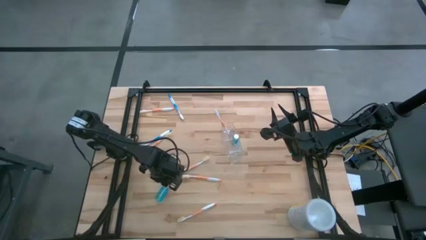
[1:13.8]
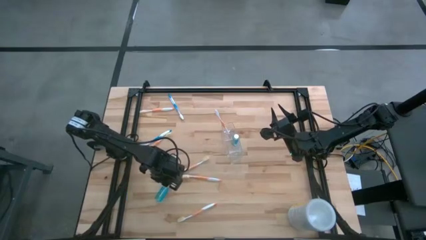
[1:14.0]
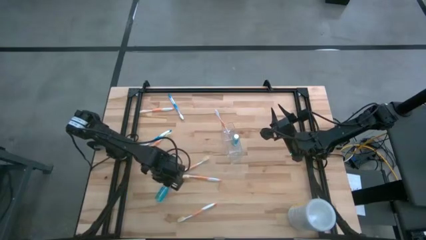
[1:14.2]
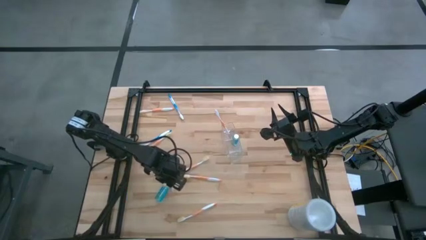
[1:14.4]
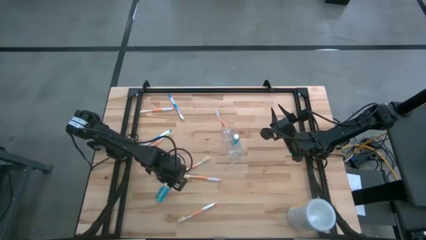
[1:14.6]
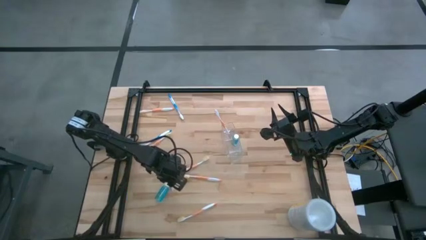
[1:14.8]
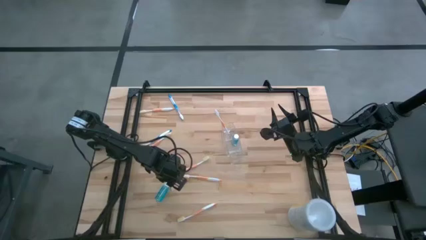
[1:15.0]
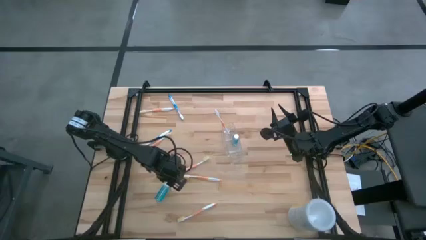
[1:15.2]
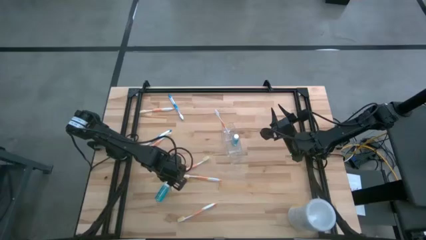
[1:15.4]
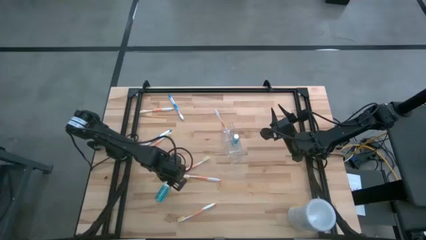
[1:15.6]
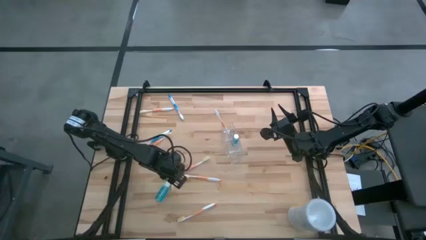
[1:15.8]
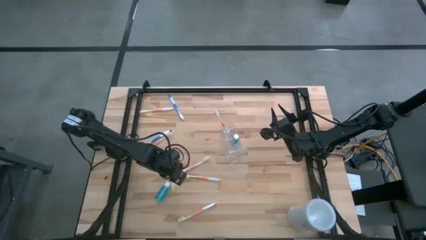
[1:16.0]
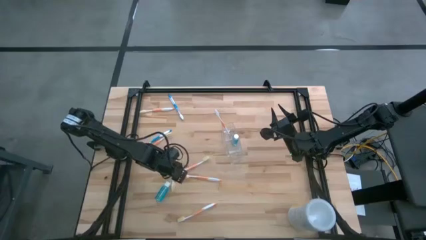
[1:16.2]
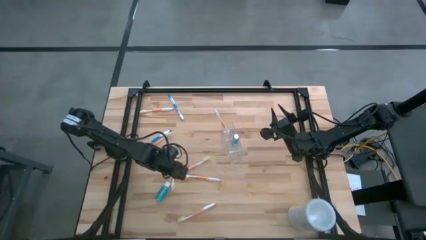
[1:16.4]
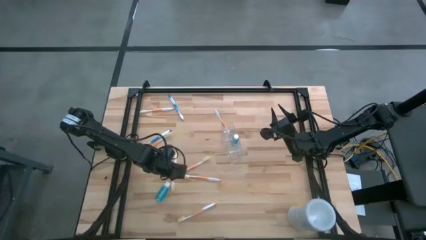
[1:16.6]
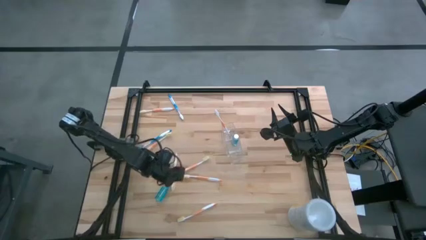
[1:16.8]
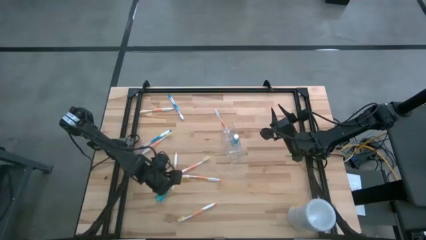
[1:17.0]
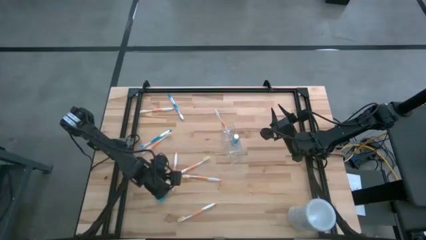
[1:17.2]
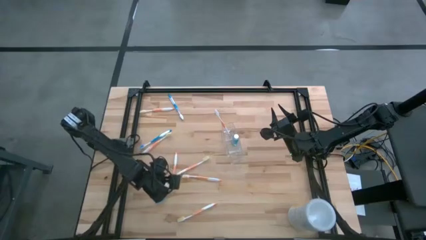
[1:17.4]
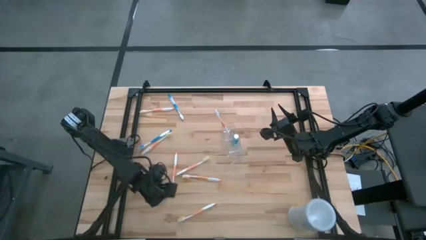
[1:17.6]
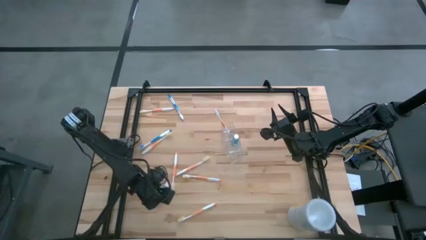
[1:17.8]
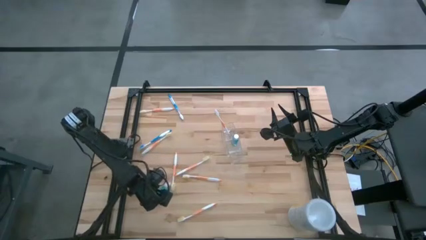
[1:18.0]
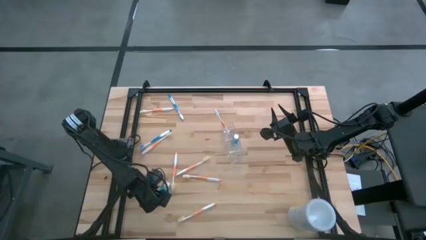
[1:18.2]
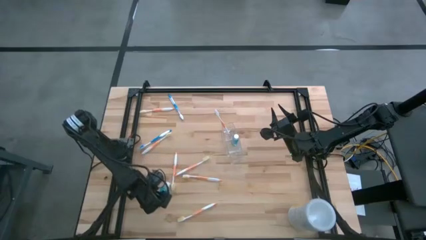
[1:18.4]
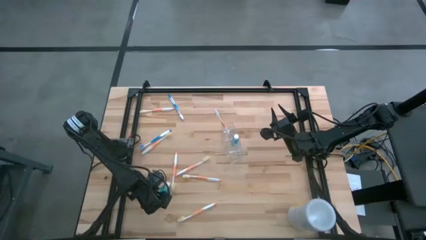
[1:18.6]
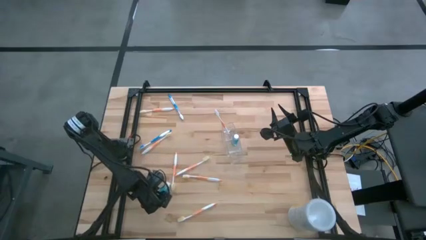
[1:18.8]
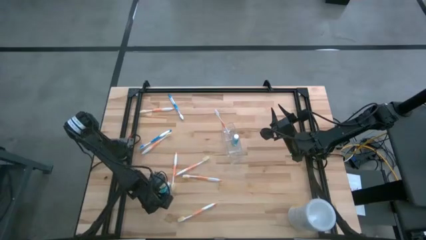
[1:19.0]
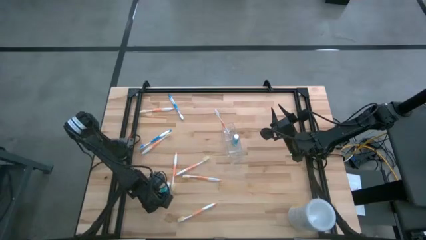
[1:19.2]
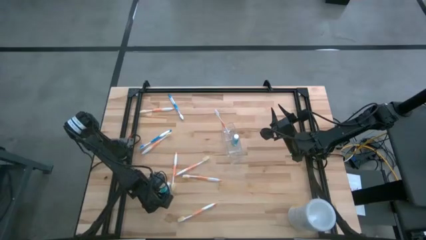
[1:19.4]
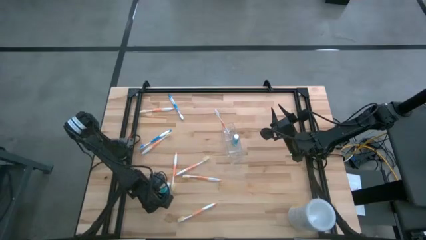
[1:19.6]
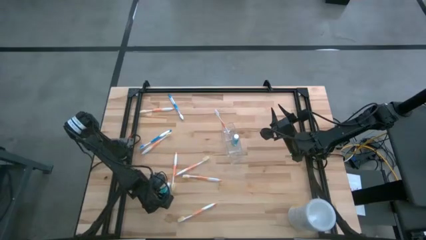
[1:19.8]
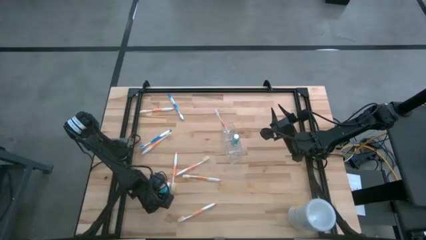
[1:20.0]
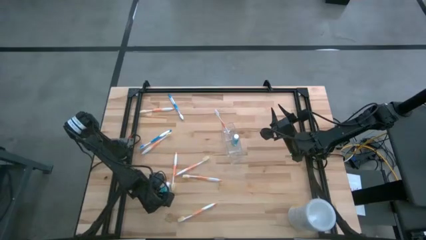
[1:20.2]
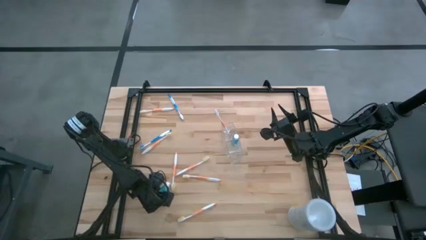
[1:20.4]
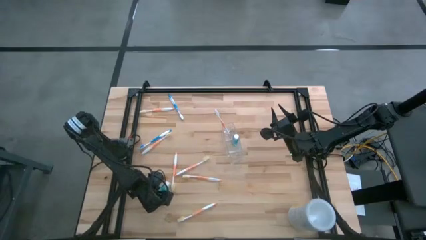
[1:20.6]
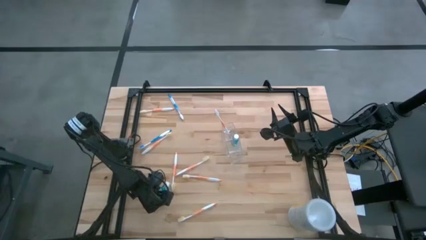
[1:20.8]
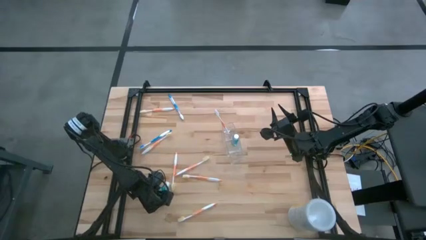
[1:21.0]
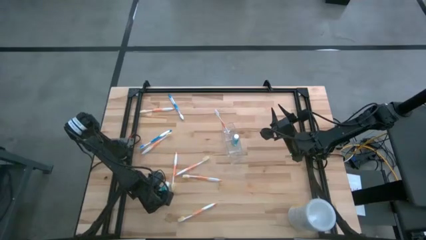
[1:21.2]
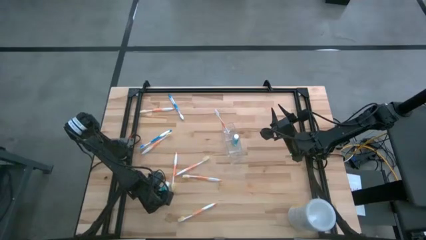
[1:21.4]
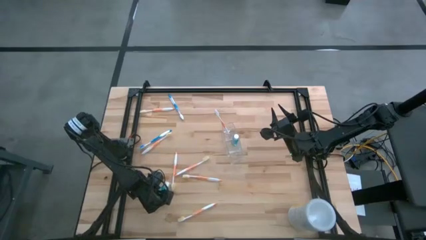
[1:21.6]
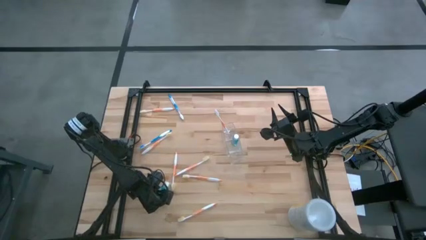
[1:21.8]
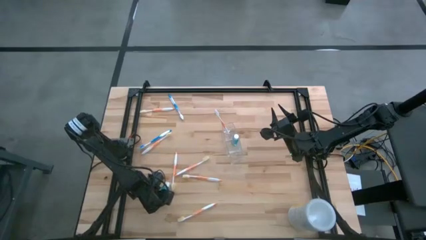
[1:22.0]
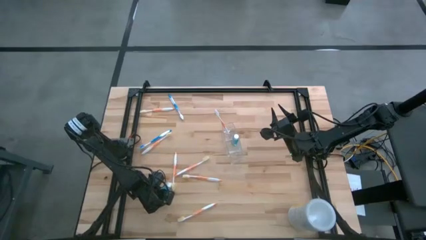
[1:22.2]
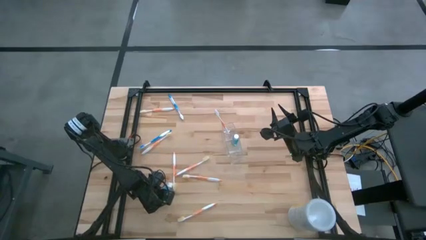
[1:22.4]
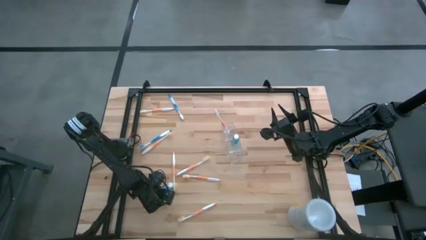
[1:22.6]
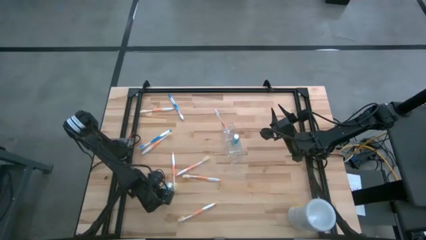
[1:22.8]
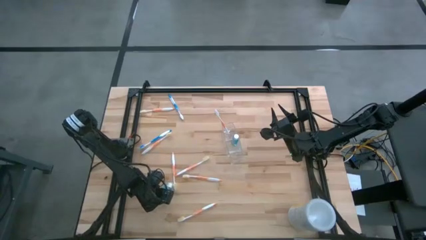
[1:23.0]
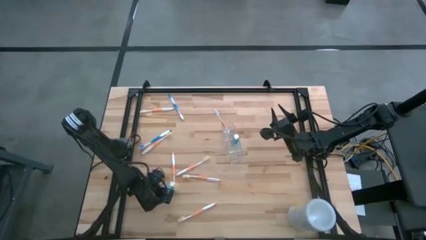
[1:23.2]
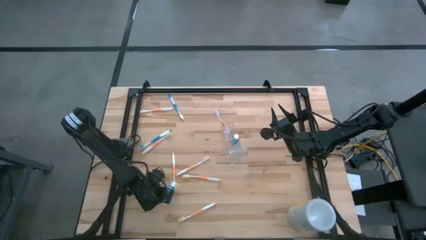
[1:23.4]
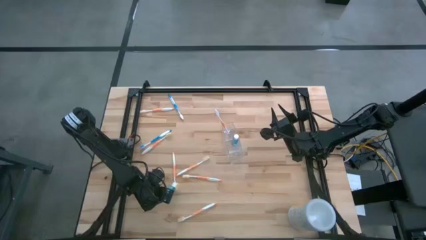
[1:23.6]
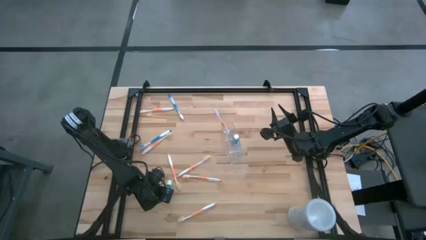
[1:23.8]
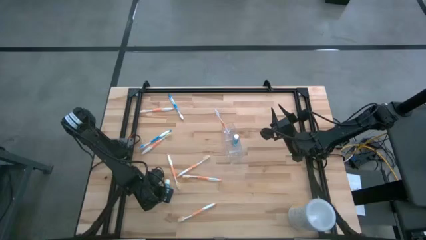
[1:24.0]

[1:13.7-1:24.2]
Task: Pick & Place toothbrushing station
Put the mouthwash bottle into the transparent organizer

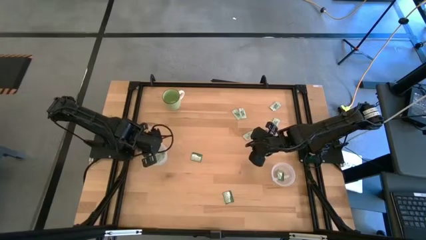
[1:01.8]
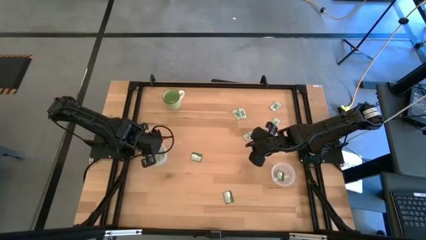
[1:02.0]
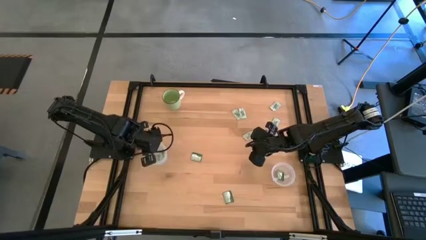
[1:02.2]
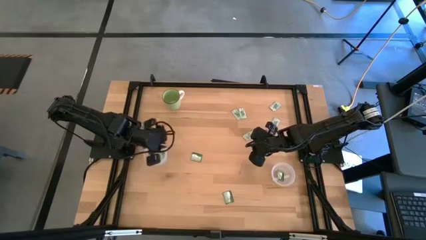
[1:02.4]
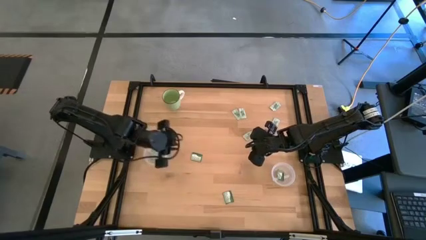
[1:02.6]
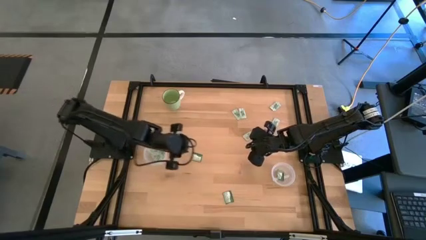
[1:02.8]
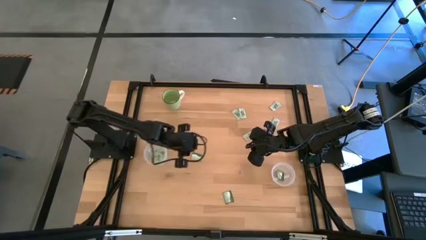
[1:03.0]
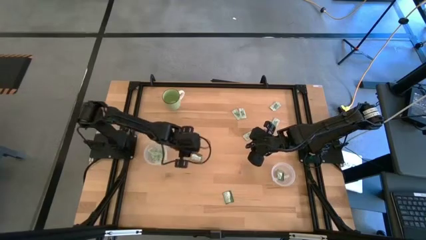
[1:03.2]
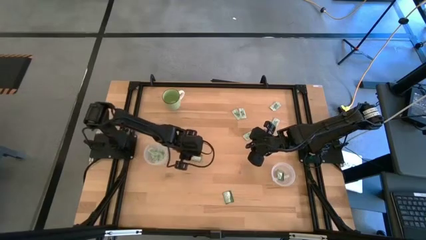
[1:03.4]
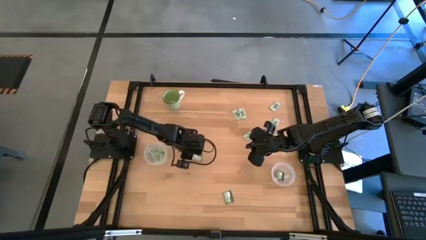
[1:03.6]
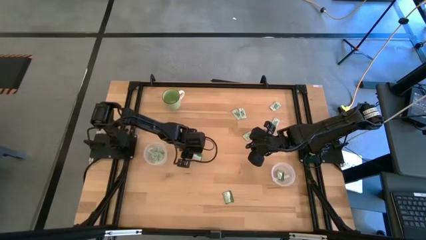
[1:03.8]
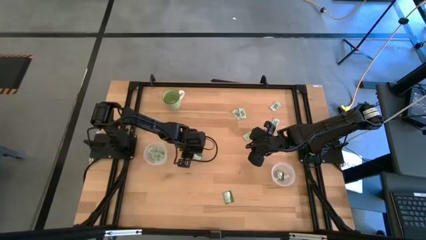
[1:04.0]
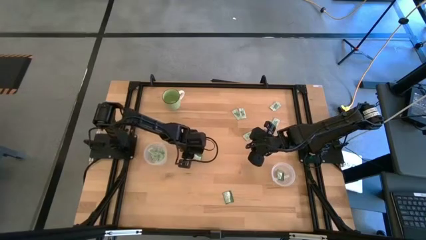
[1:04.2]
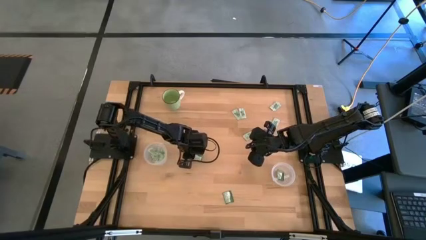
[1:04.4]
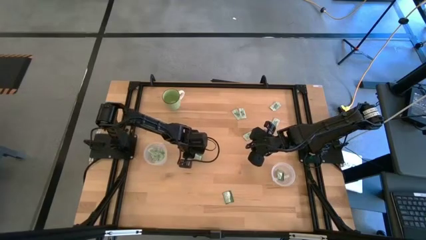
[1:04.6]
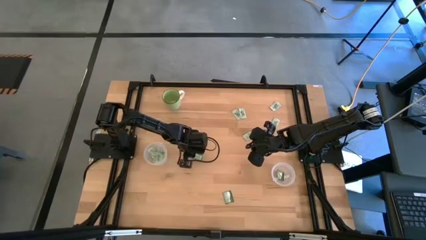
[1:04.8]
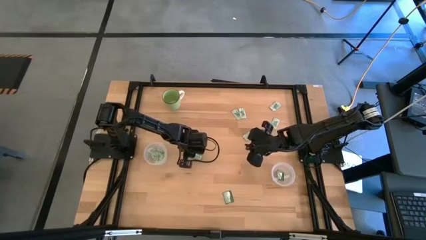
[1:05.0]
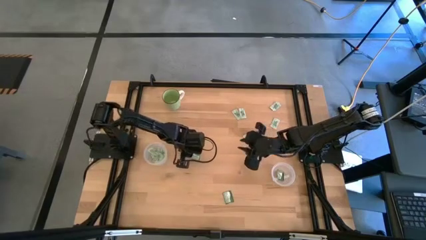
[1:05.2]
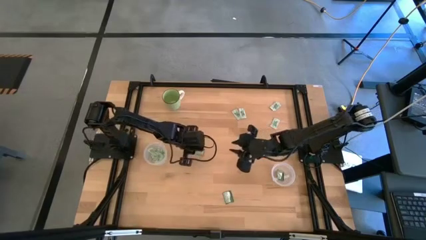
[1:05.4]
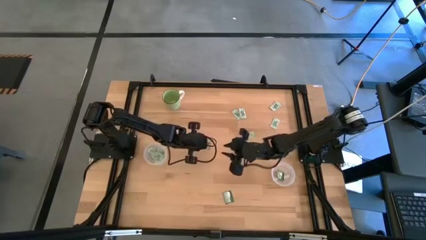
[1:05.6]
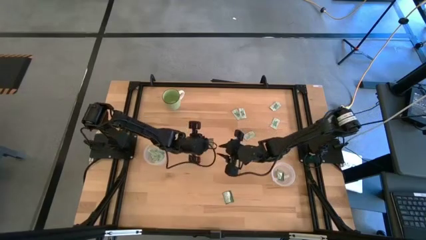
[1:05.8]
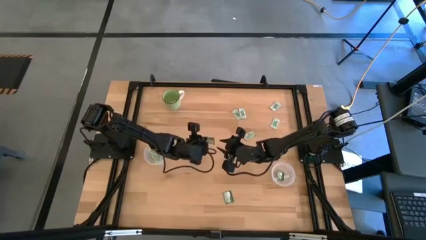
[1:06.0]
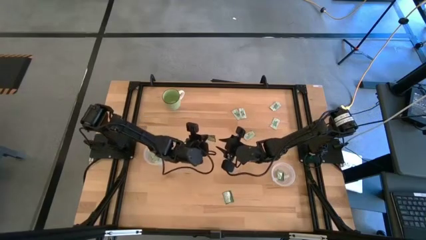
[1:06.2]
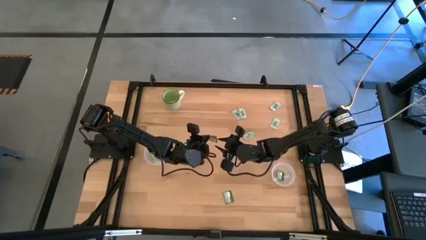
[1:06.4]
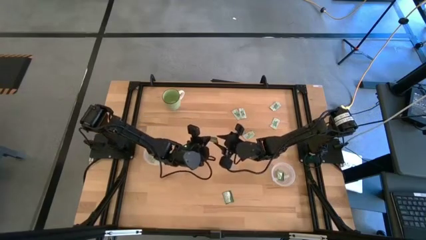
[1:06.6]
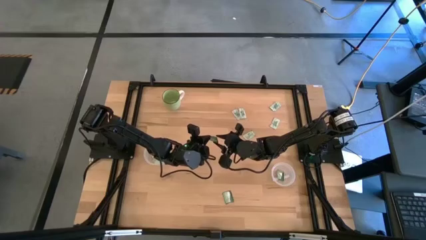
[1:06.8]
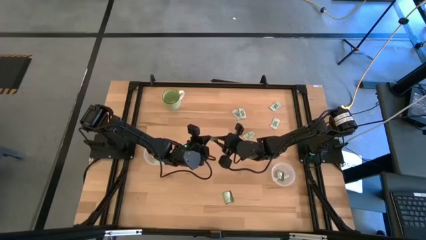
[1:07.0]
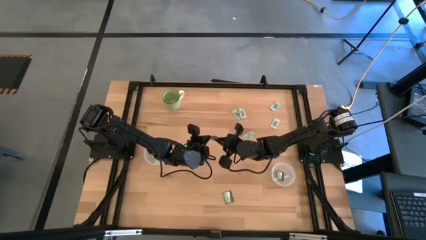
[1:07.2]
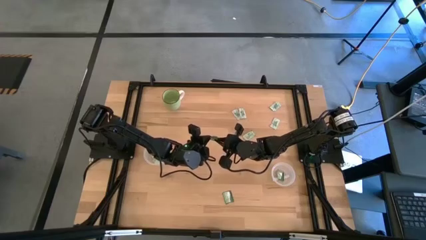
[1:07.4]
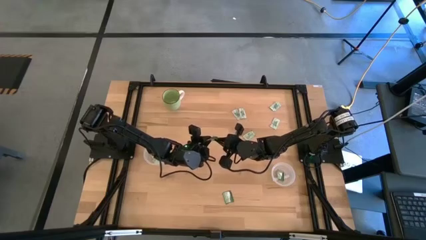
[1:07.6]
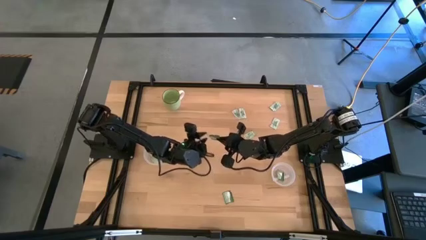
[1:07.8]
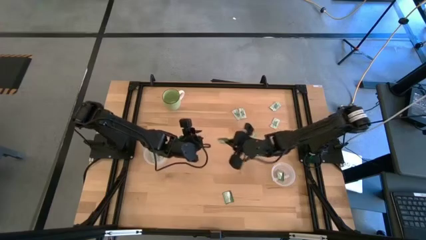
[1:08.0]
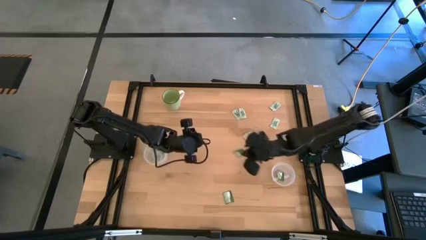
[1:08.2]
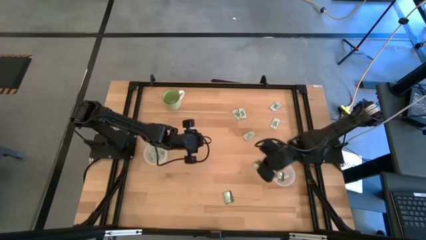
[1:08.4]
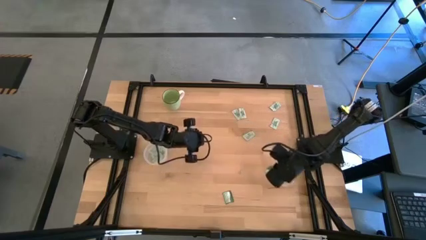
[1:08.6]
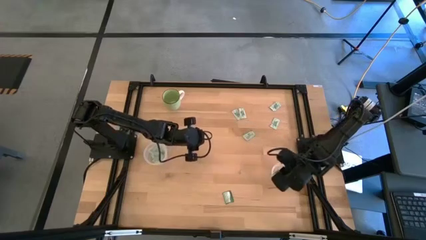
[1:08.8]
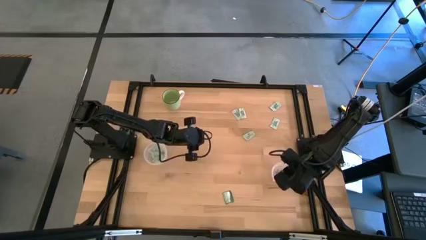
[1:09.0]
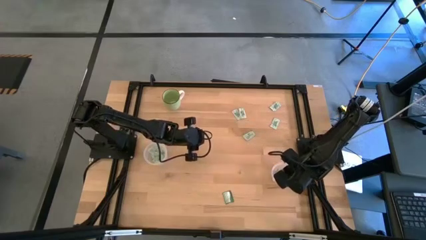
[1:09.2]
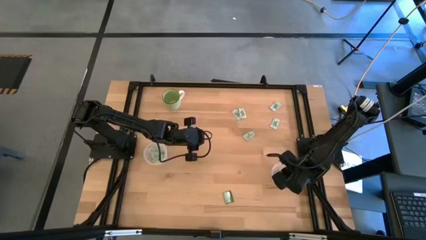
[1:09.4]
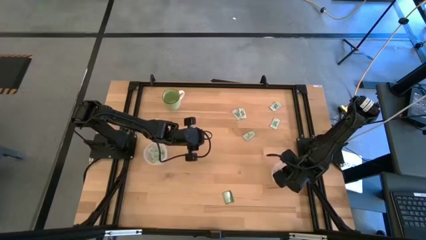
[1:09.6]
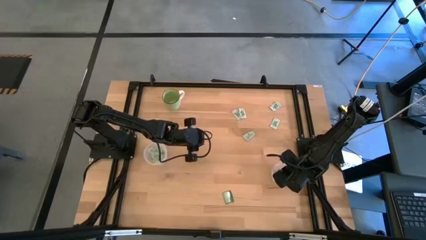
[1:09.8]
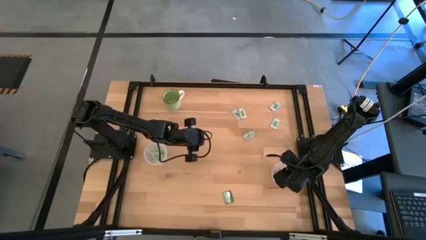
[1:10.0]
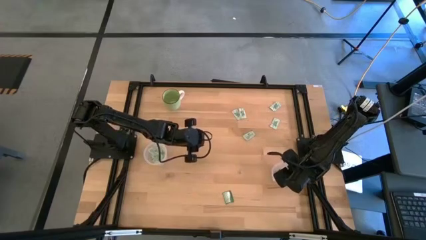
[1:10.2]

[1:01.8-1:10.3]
Task: Pick and place items into bin
Put the truvia packet into the right transparent bin
